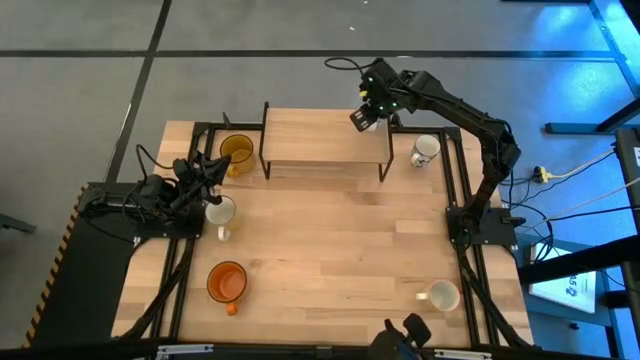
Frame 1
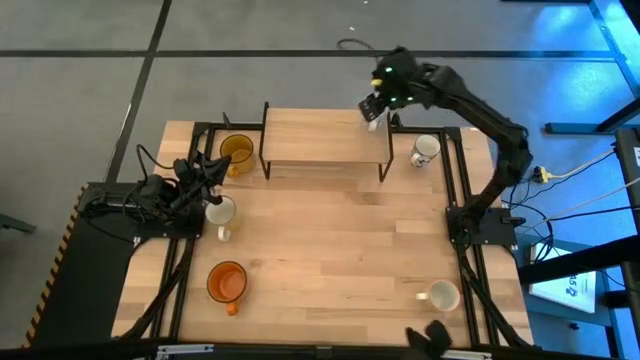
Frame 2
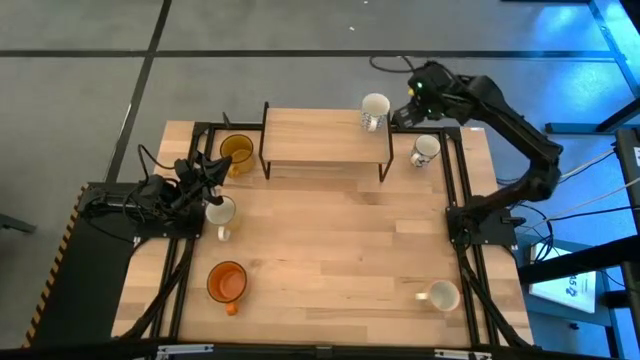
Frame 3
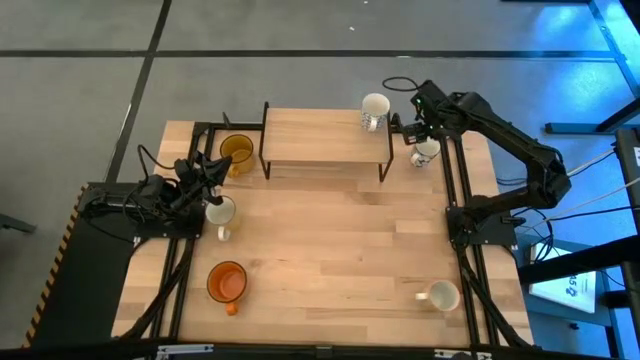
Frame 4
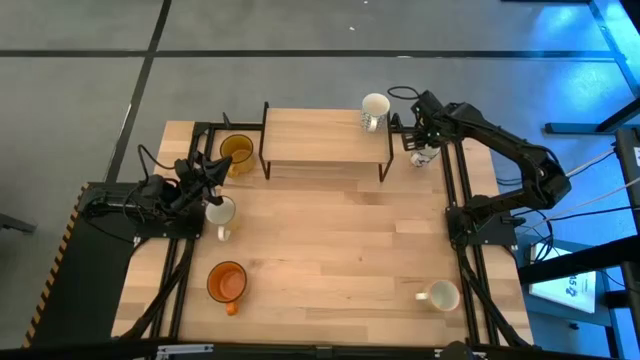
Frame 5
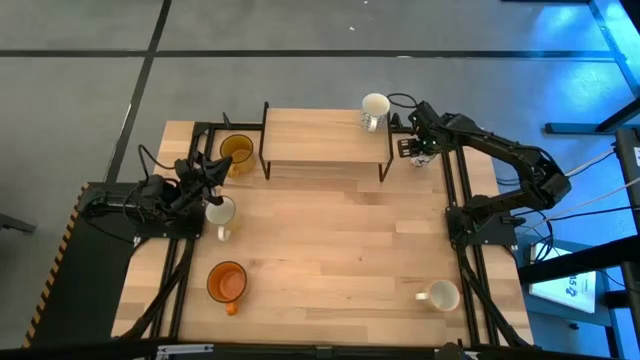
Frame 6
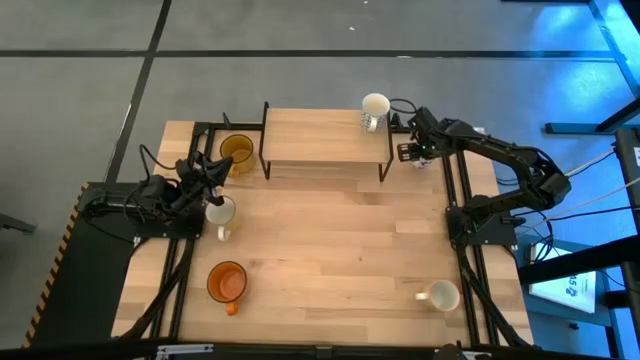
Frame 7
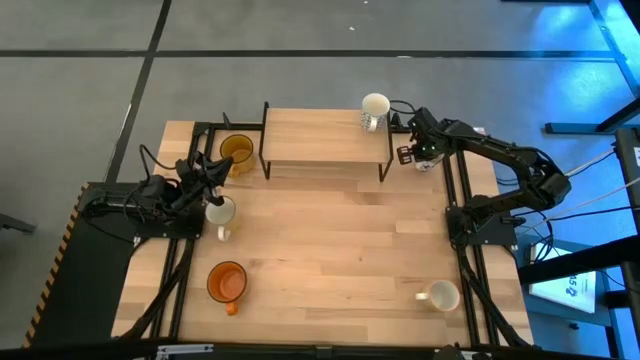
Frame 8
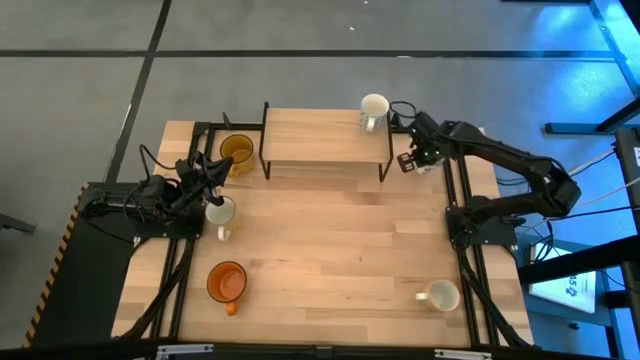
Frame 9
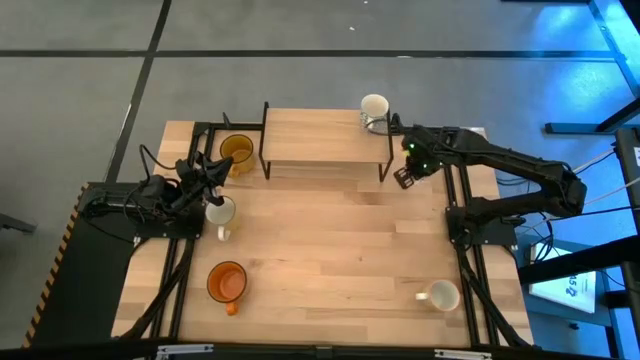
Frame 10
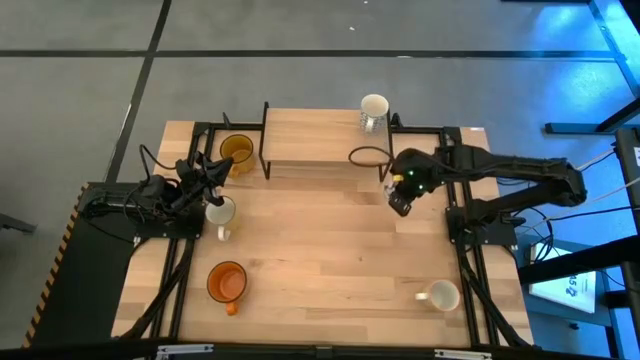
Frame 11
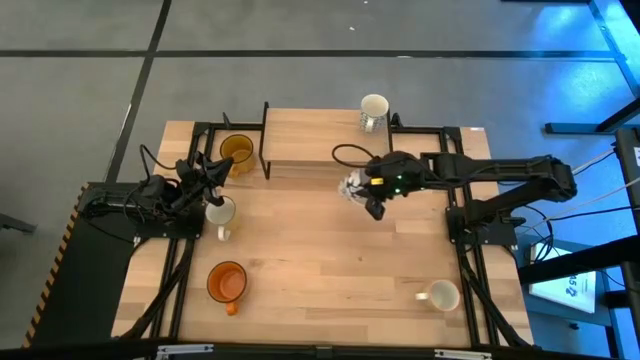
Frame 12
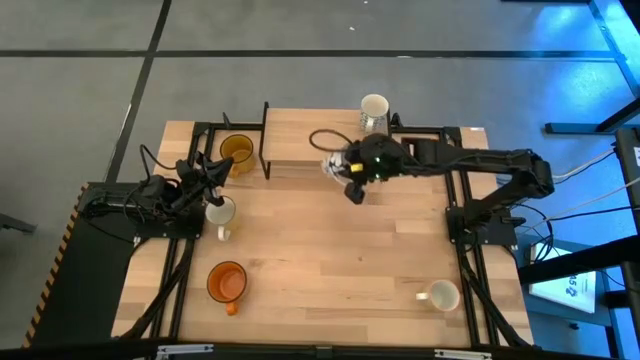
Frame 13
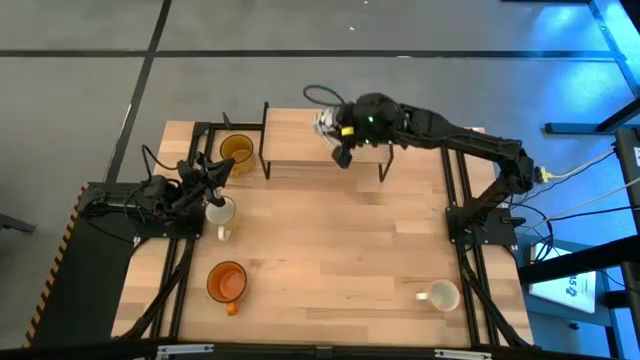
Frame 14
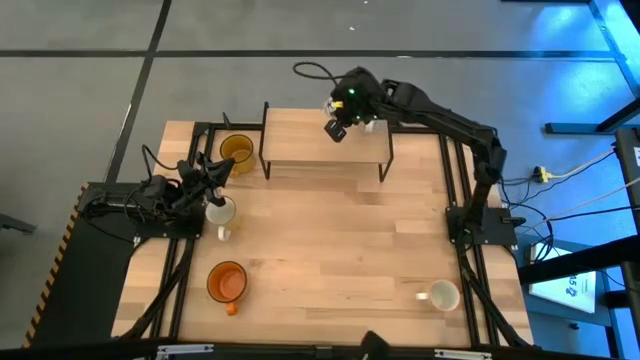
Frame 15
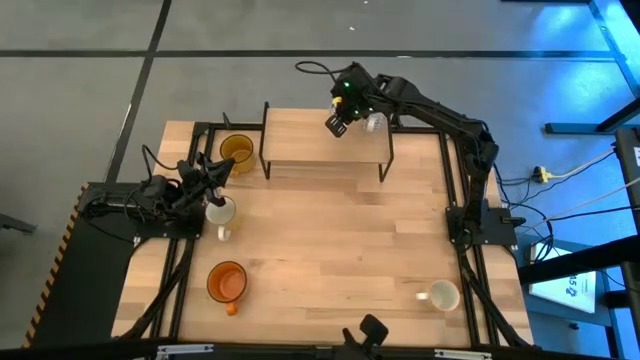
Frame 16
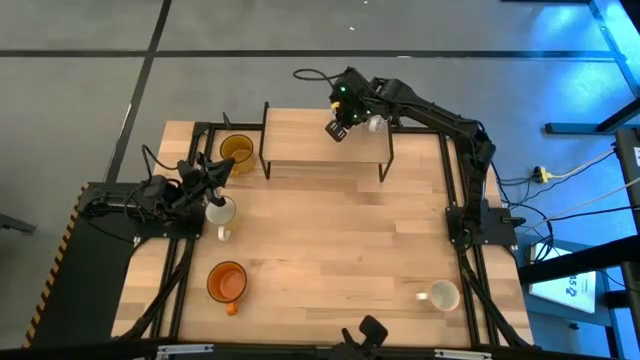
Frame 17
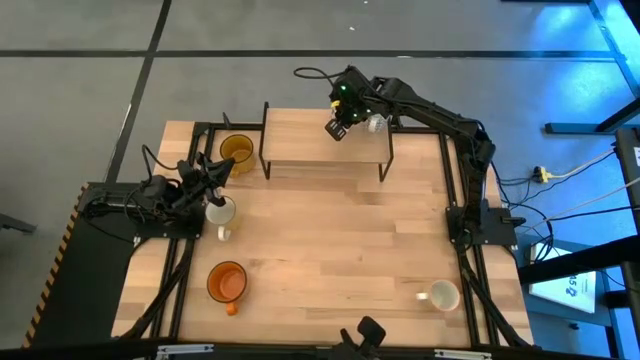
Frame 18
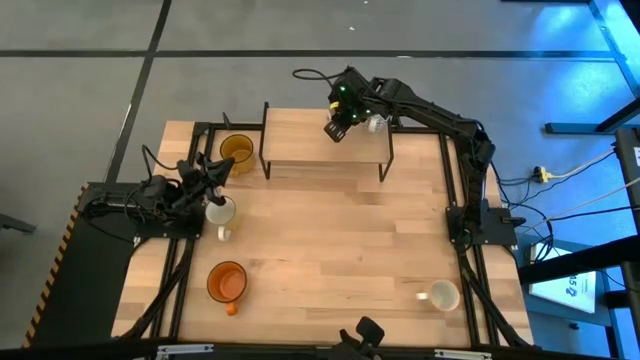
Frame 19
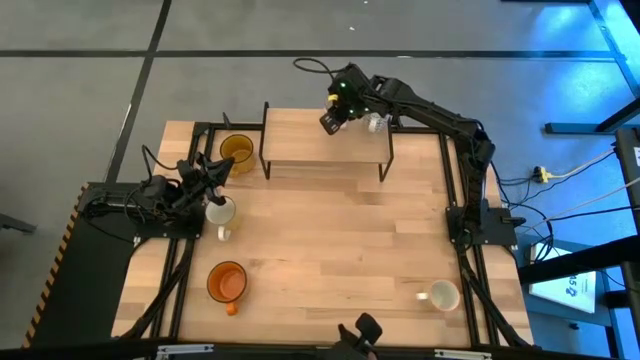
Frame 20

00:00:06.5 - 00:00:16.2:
Task: Place coffee mugs
Put the blue patterned mug on the shelf

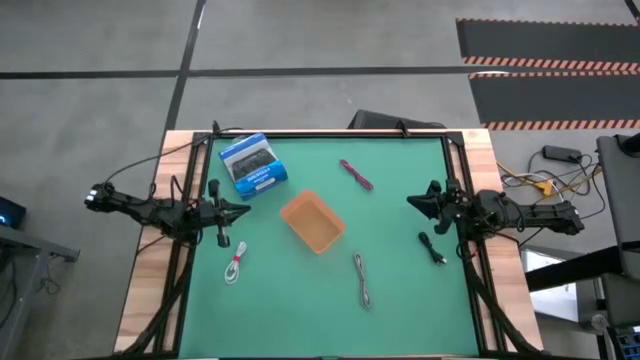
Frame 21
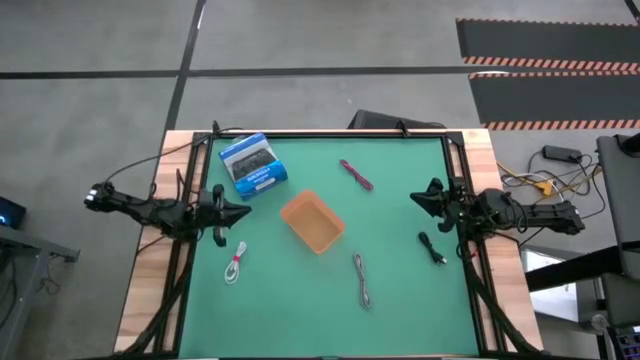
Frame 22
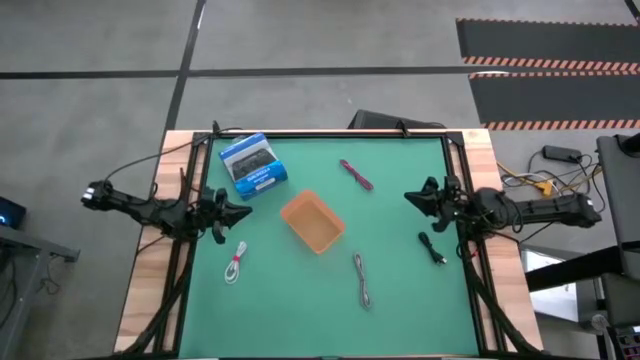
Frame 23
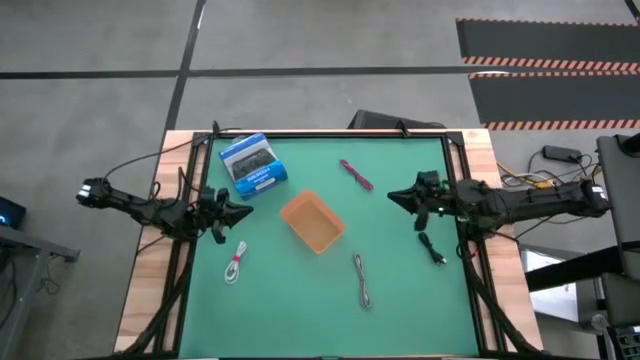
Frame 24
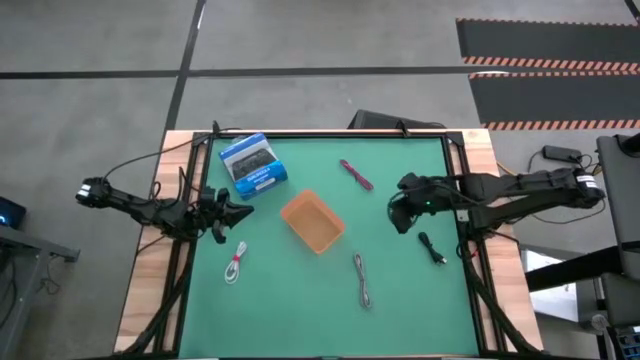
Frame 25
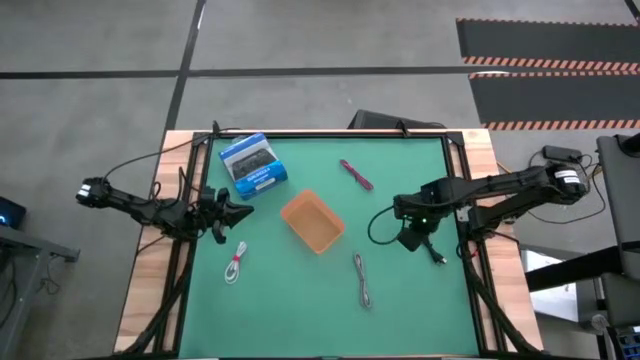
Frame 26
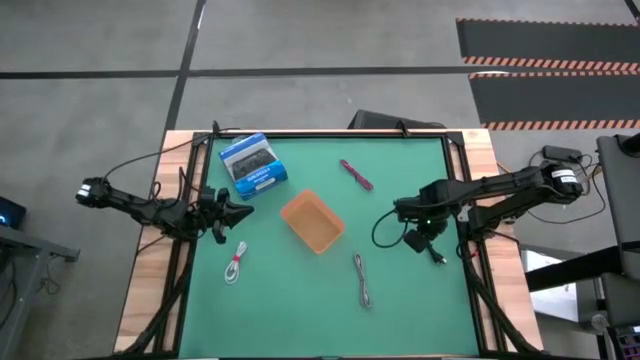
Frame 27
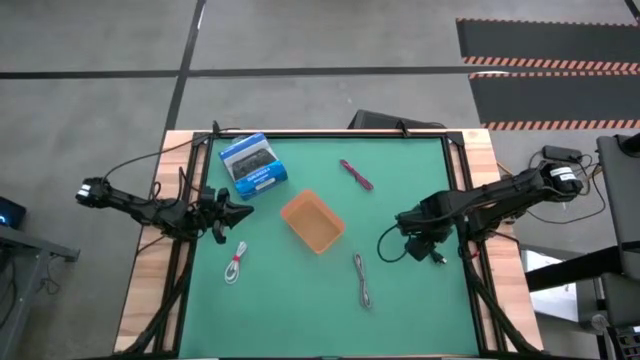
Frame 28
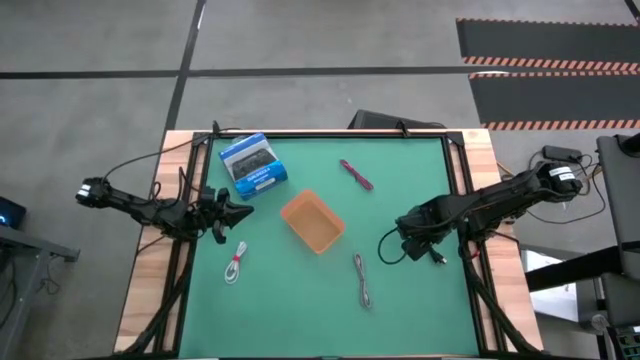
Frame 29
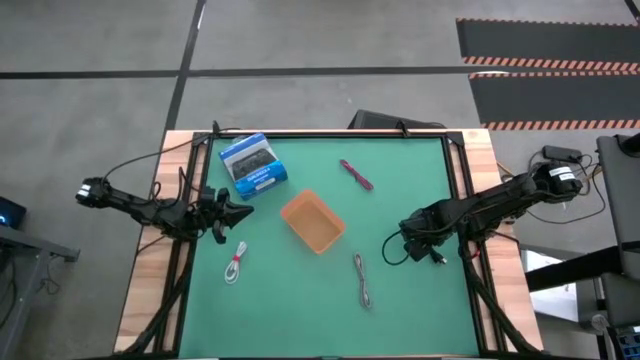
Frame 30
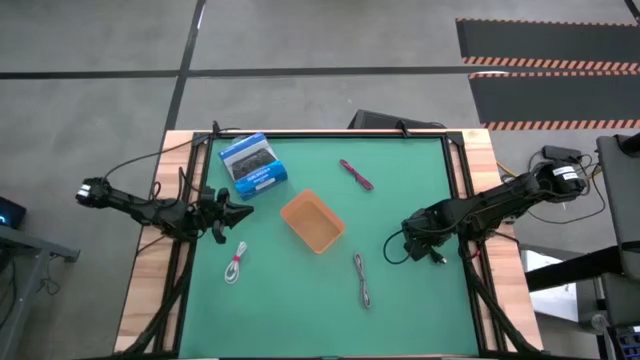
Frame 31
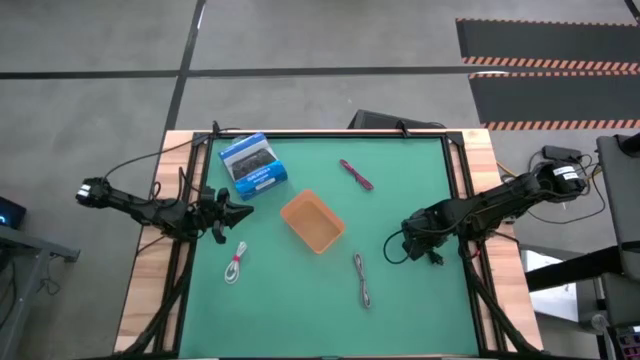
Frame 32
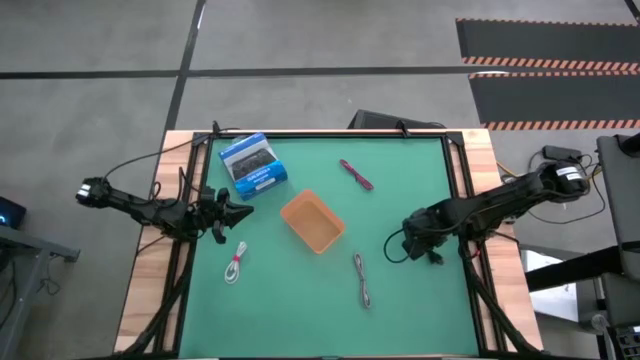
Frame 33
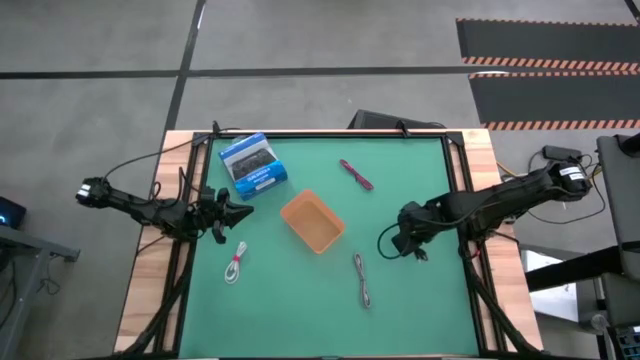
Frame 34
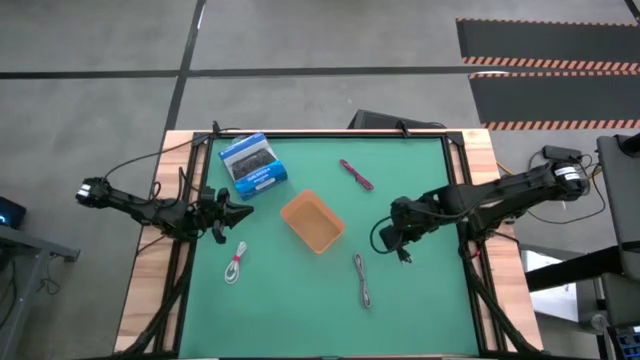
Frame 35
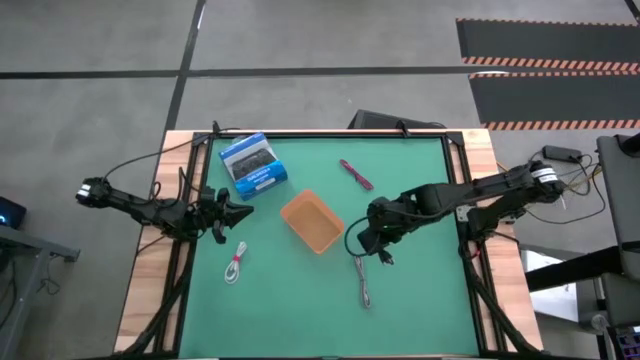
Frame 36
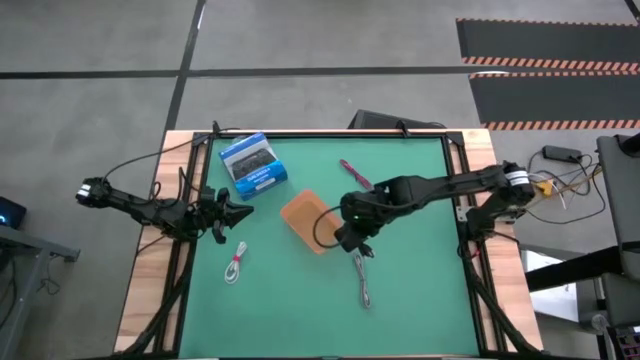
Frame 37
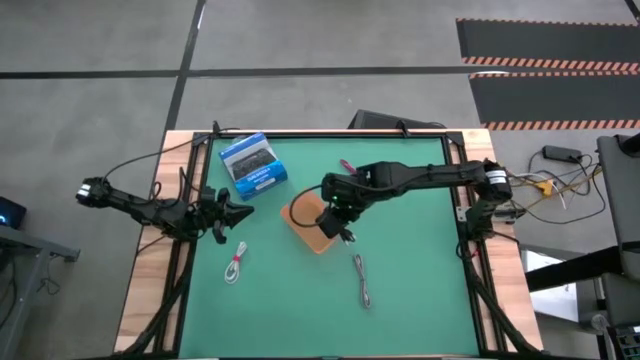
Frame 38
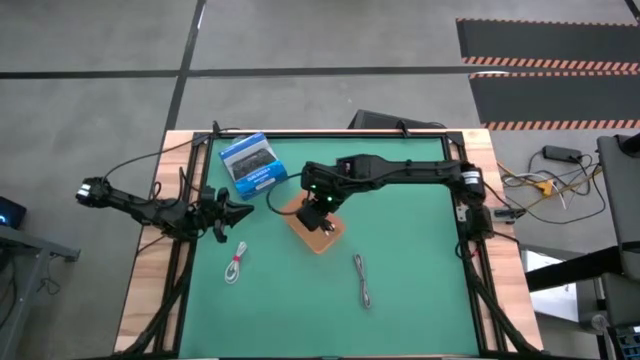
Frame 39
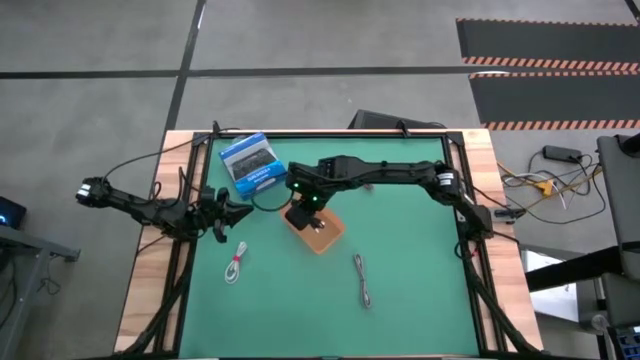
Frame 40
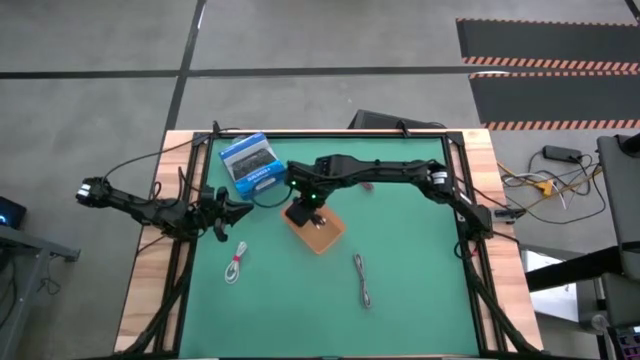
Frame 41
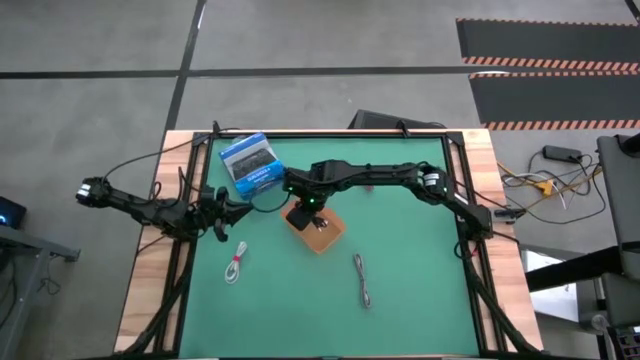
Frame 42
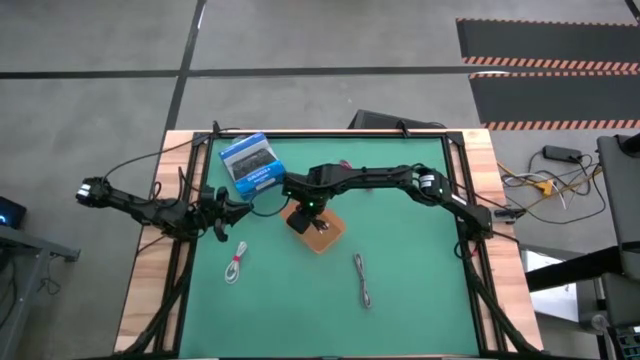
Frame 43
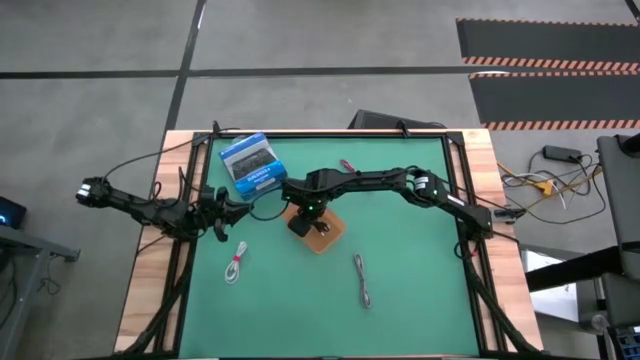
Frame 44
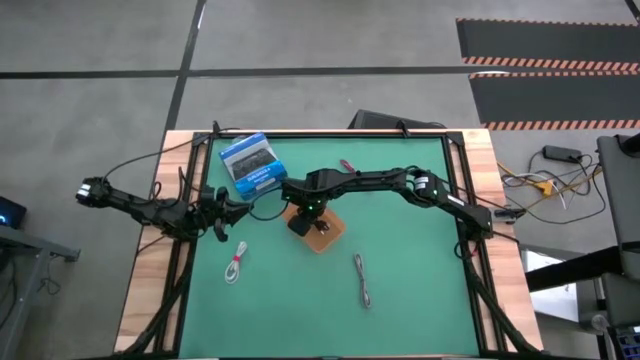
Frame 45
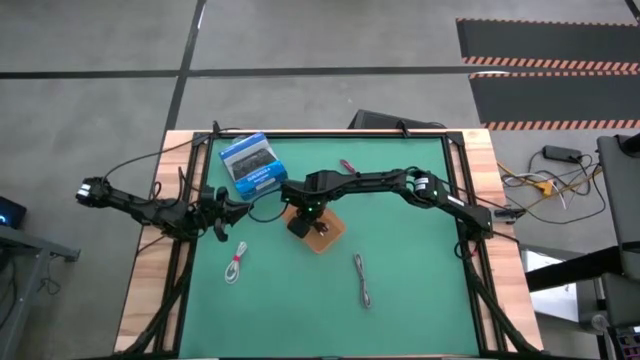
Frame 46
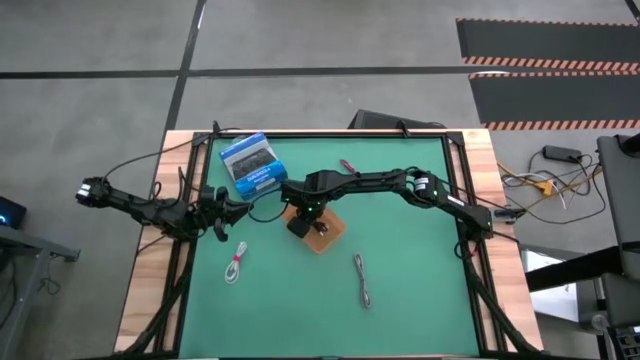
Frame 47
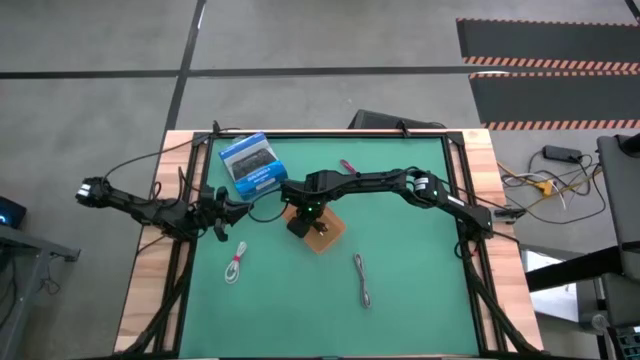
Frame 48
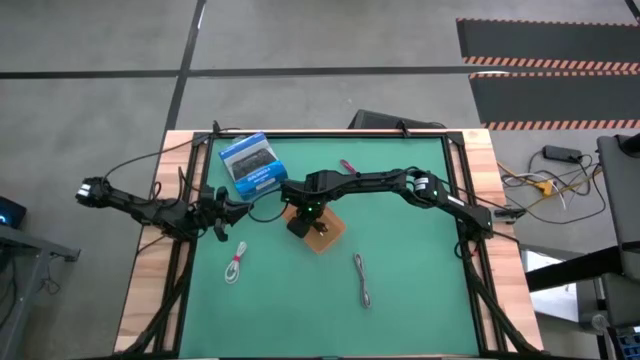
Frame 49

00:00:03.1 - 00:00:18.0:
Task: Pick and place USB-C Cables
Put the black charger cable into the orange bin
